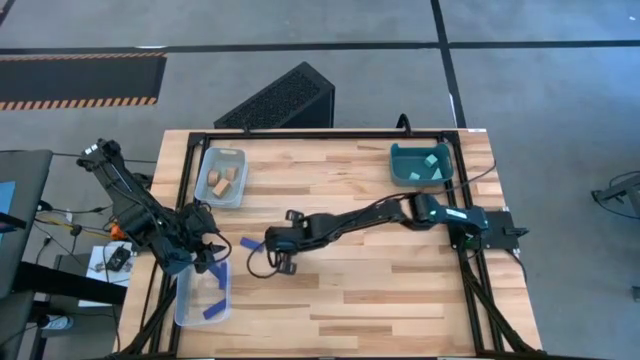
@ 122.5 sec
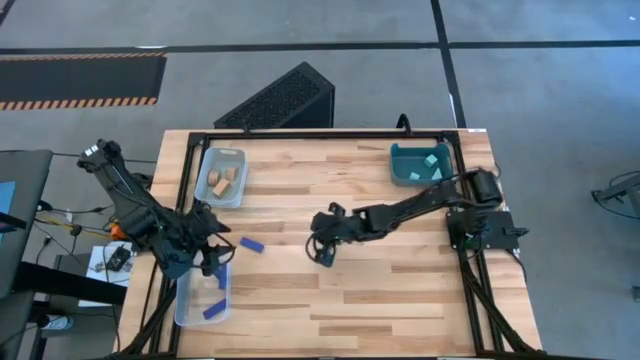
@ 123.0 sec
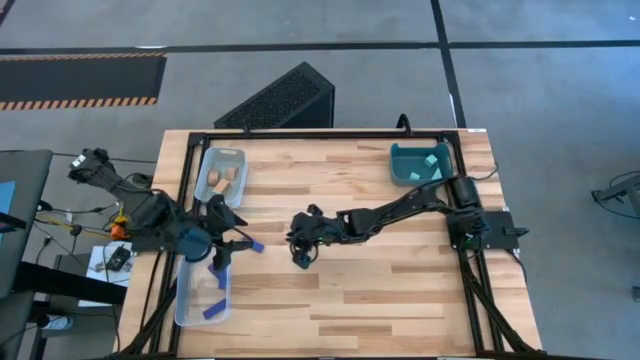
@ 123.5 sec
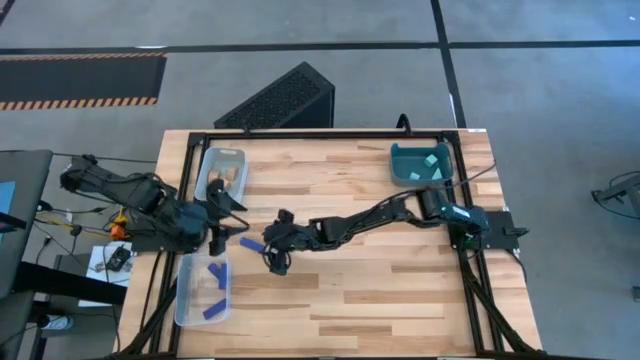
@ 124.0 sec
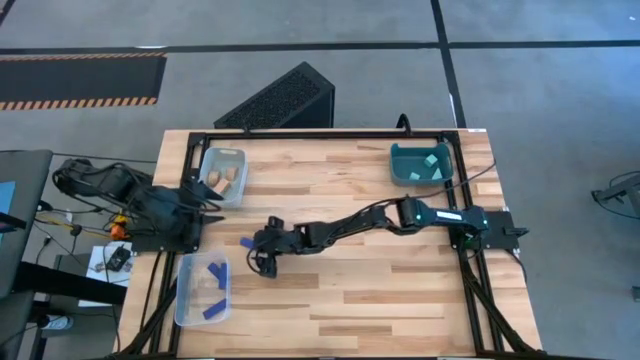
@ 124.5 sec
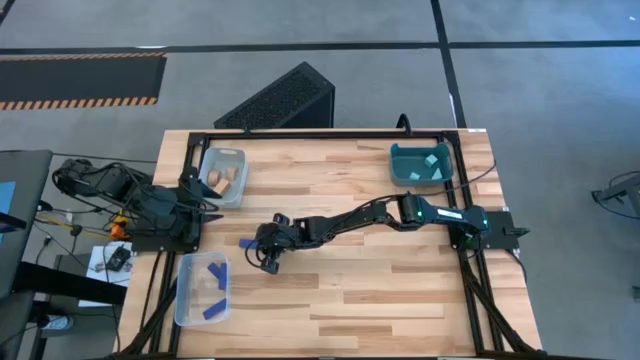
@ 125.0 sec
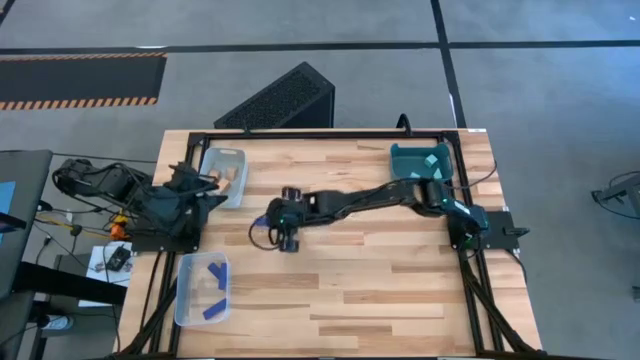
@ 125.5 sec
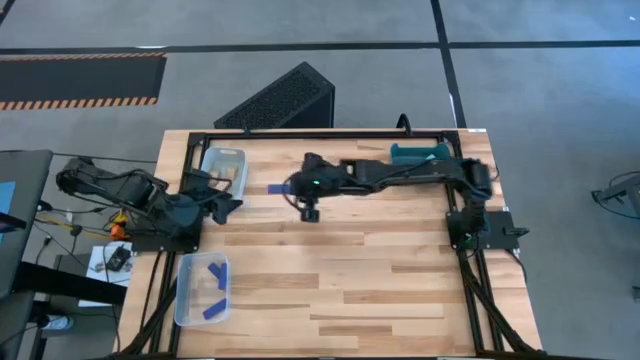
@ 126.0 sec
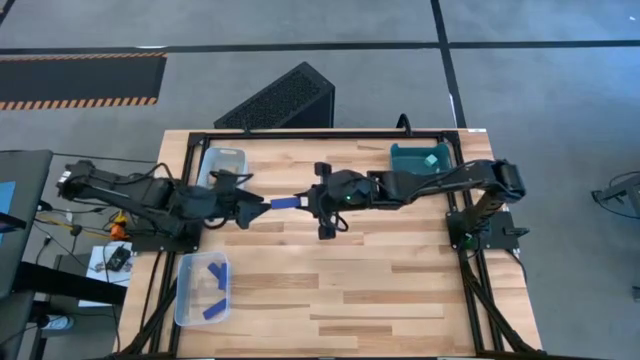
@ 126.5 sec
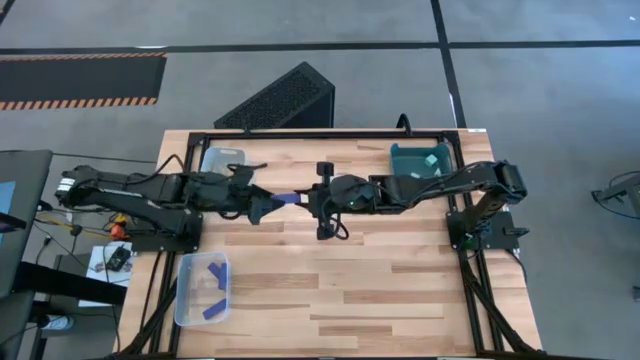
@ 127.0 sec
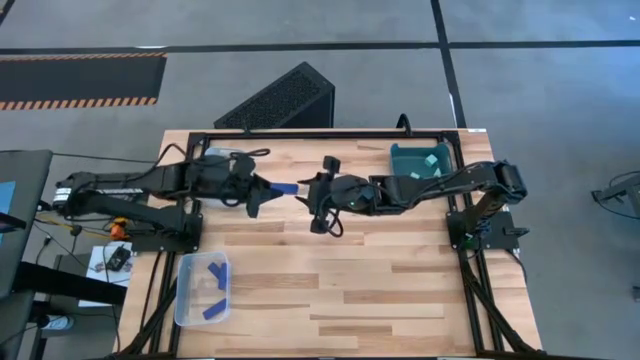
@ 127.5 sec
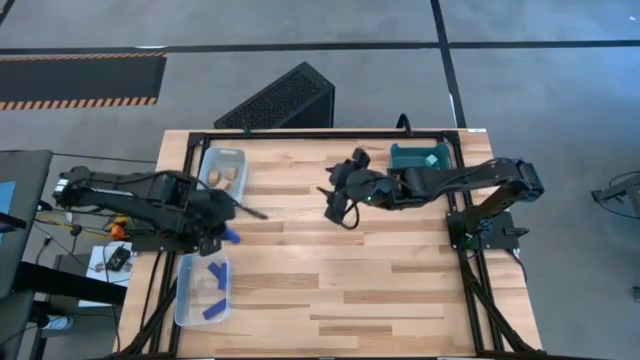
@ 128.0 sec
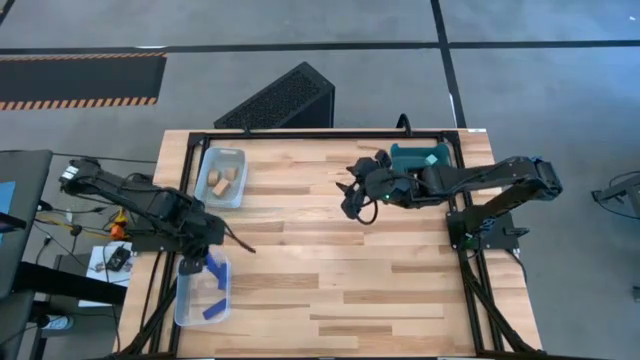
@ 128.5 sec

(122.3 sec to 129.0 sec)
Task: Sort & place blocks by color
Put the blue block into the transparent bin

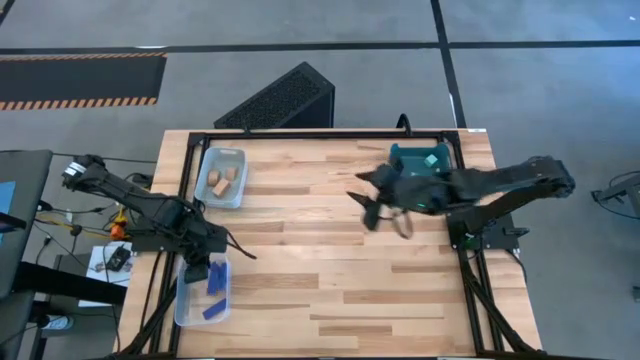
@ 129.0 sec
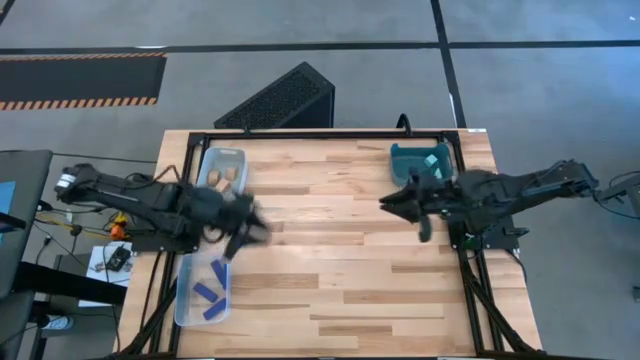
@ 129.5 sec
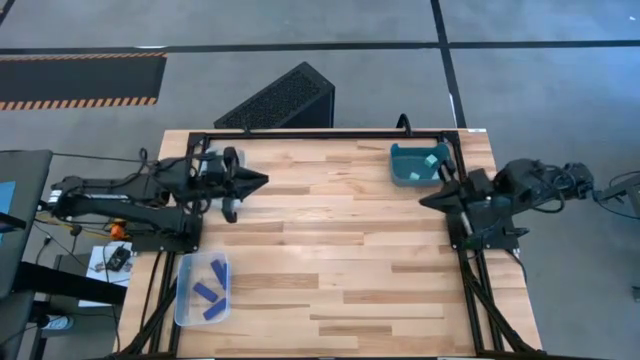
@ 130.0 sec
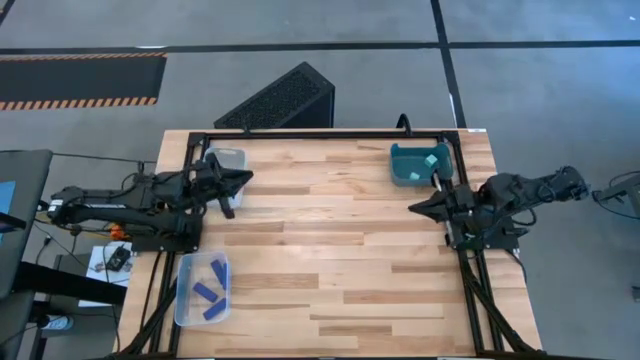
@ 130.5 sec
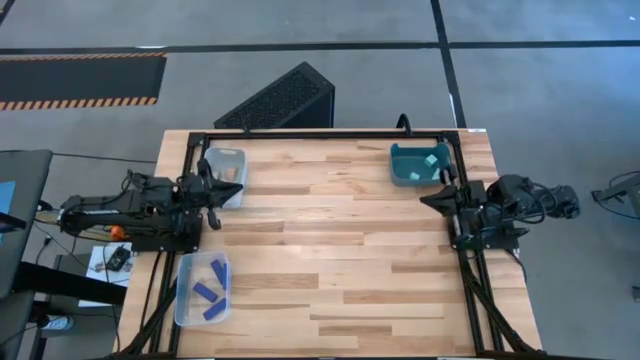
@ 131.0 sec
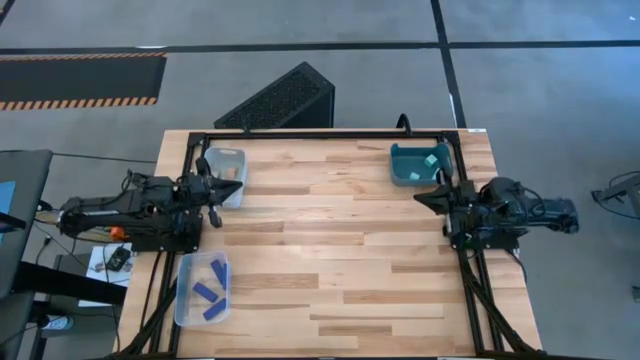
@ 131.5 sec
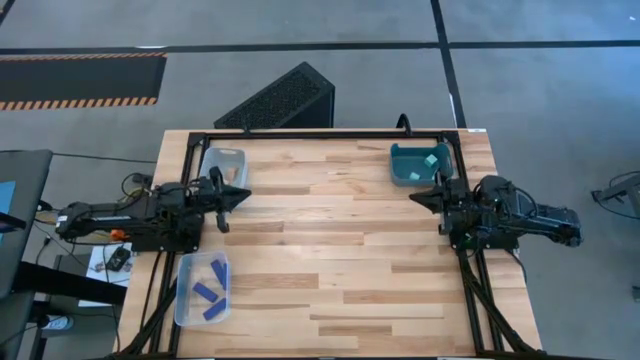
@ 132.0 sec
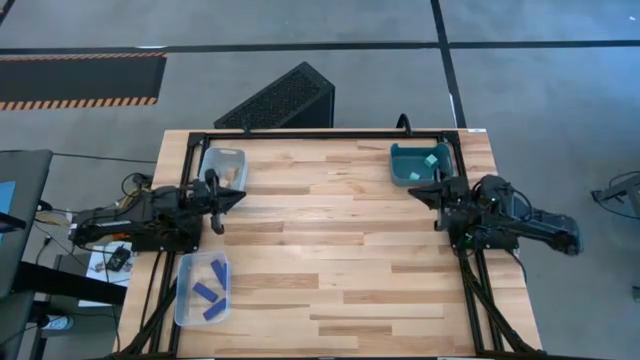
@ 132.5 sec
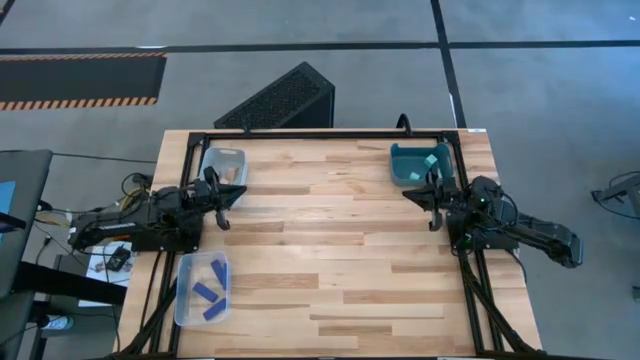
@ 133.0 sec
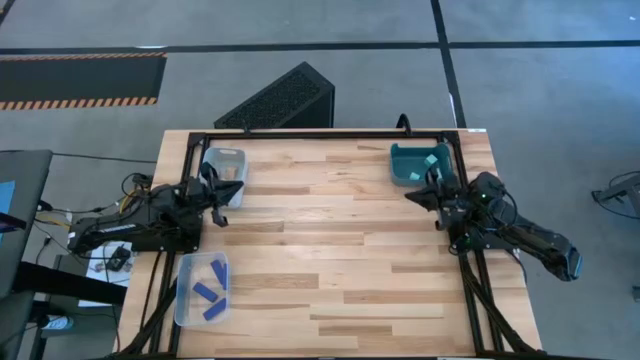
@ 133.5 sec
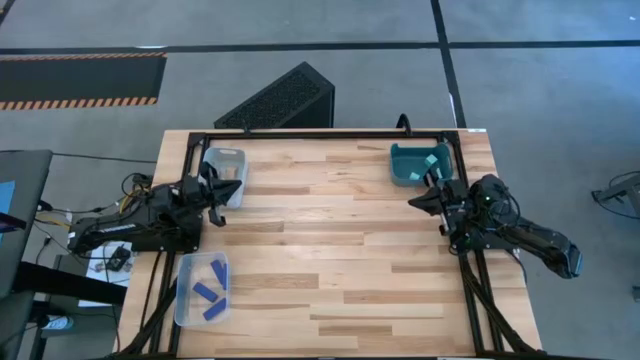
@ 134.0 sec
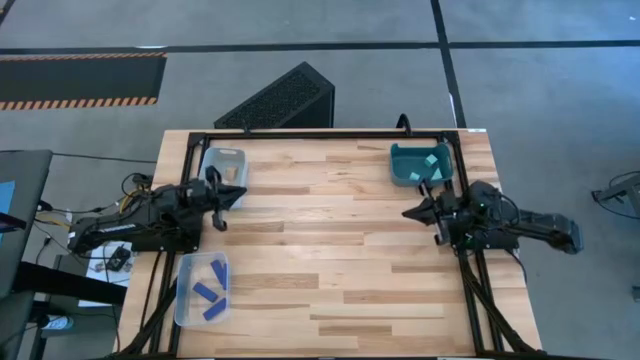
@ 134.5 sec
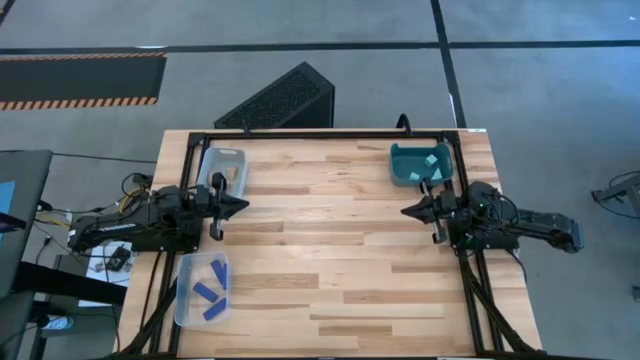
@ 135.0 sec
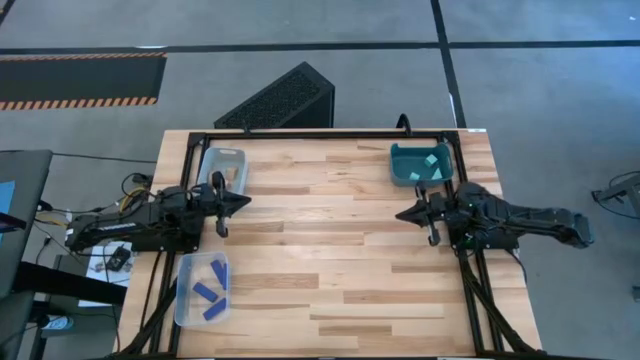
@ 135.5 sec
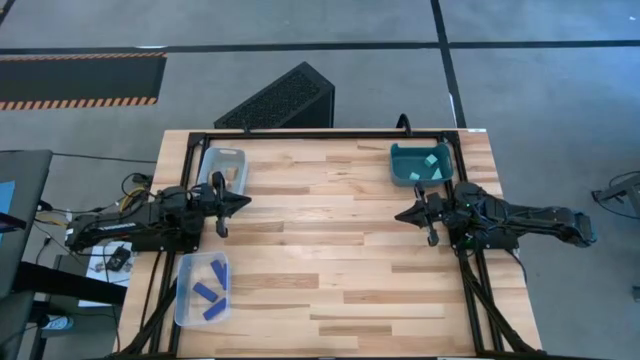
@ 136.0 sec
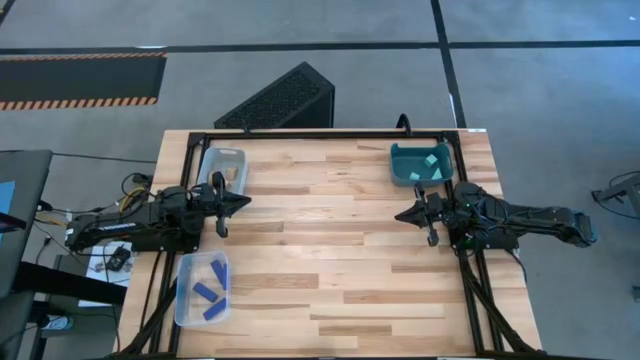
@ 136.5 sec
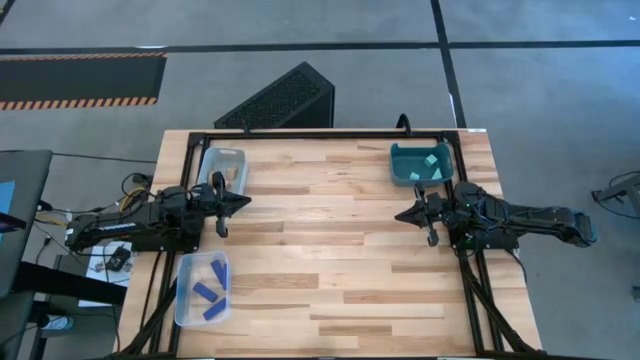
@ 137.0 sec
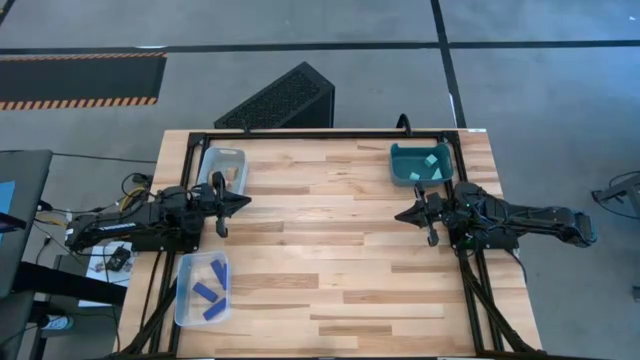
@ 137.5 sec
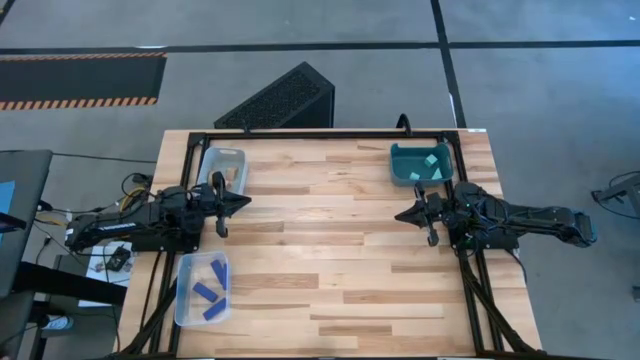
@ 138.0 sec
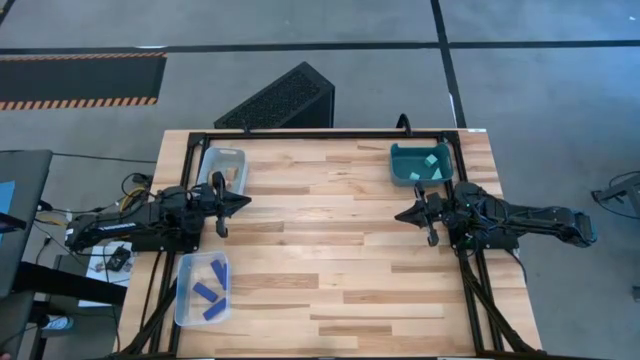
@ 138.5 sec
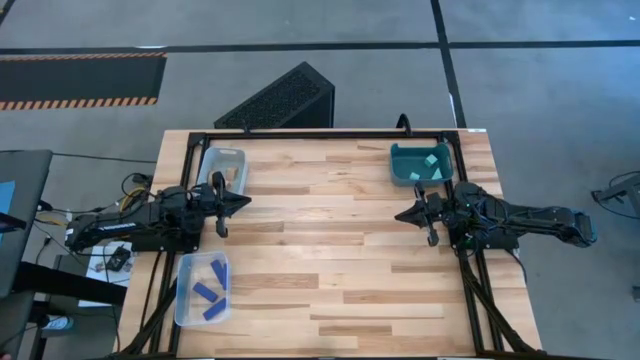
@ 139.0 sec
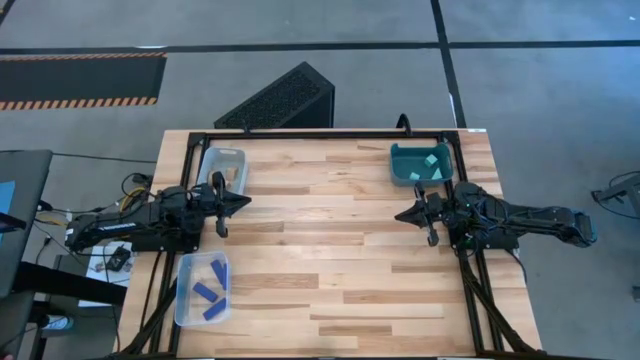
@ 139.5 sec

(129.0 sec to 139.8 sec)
Return to Home Position
